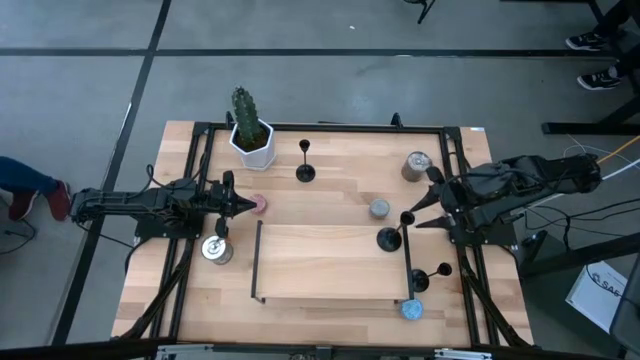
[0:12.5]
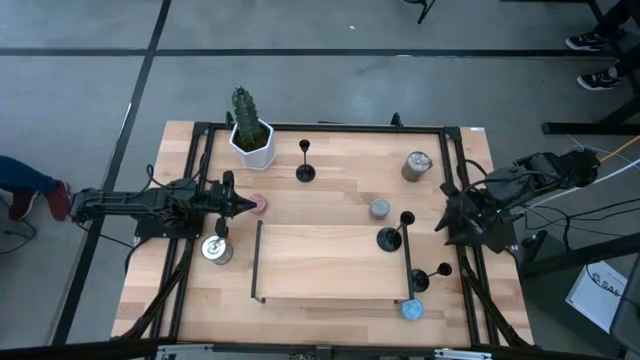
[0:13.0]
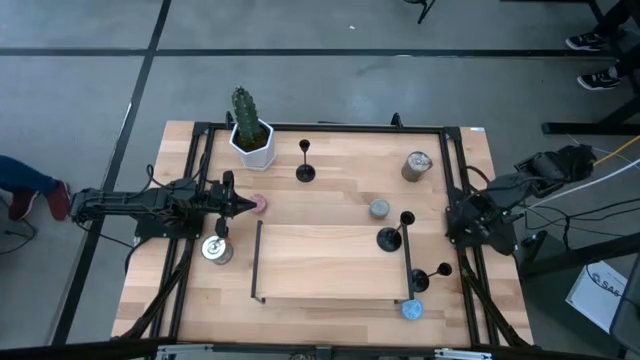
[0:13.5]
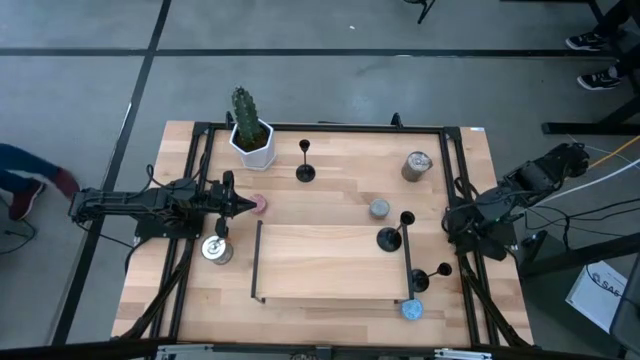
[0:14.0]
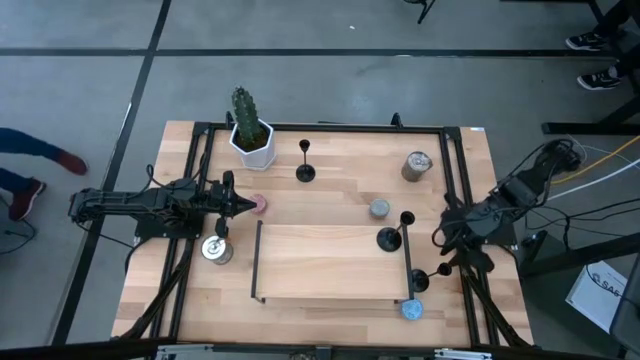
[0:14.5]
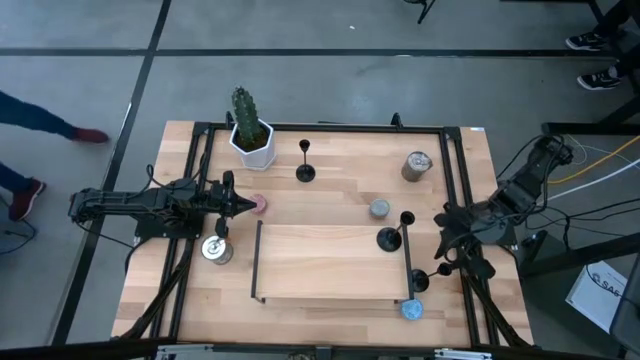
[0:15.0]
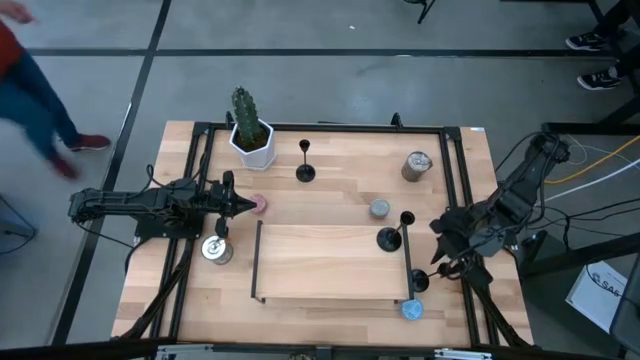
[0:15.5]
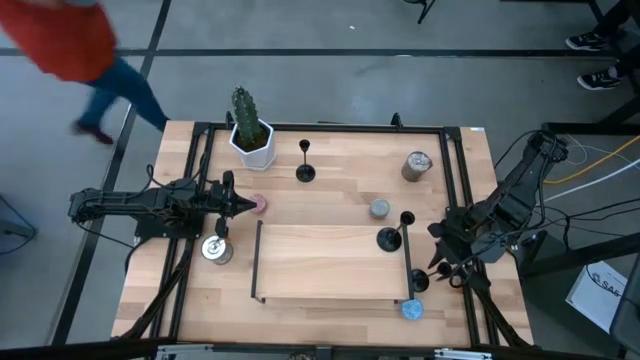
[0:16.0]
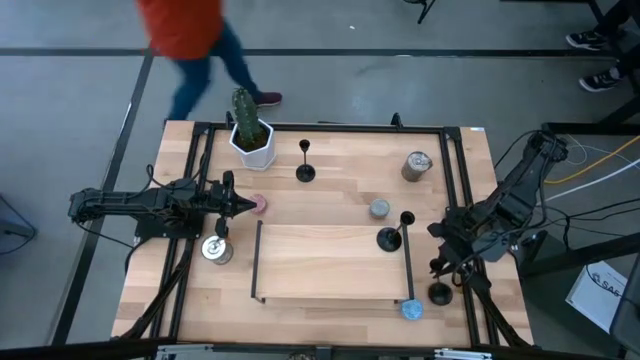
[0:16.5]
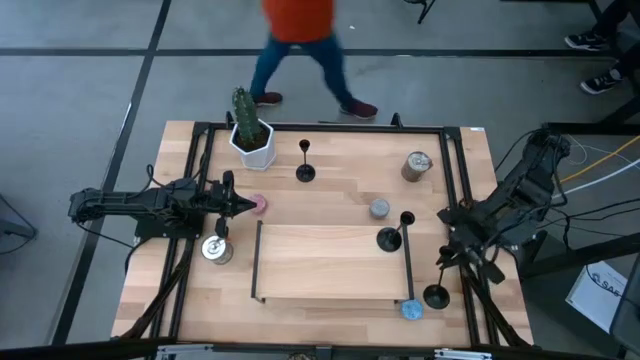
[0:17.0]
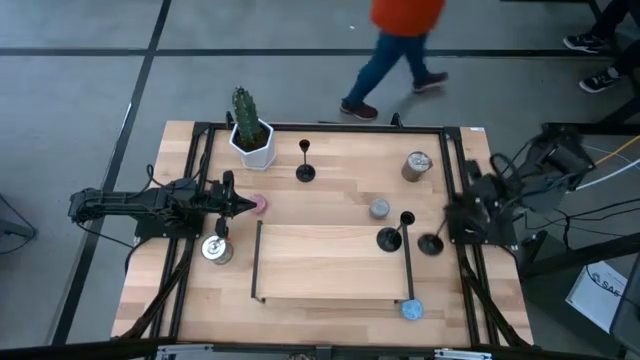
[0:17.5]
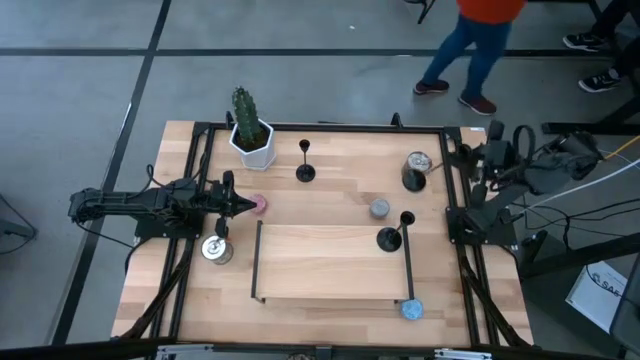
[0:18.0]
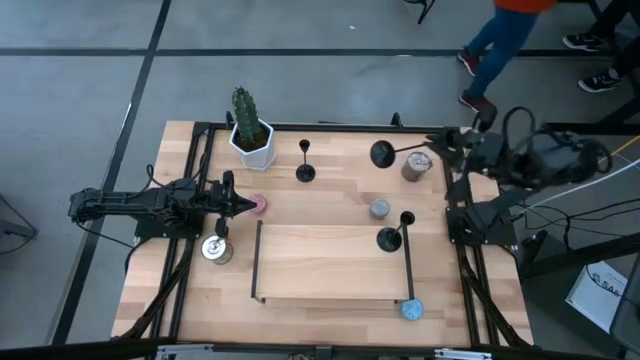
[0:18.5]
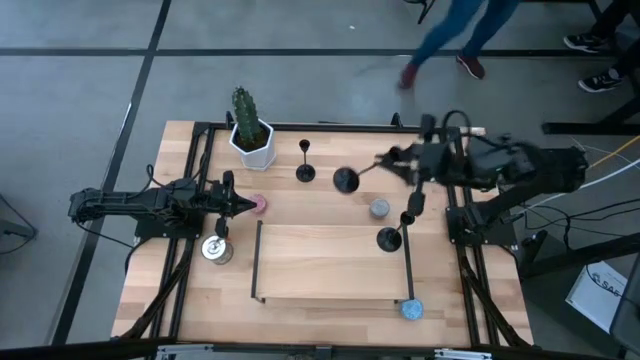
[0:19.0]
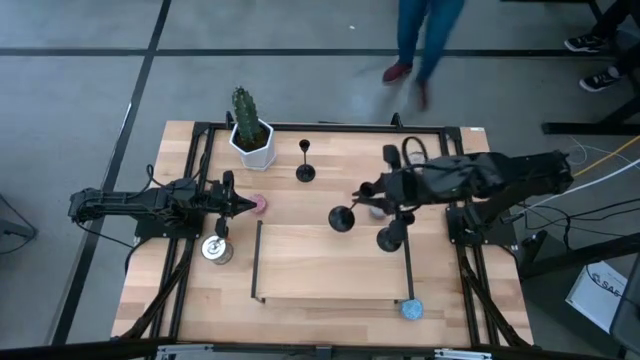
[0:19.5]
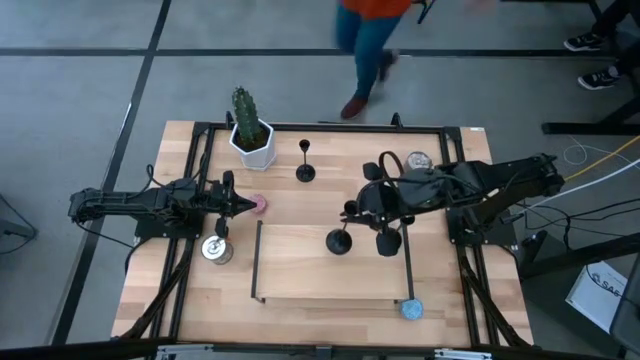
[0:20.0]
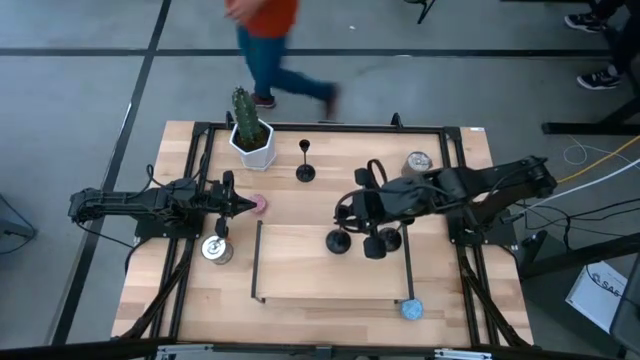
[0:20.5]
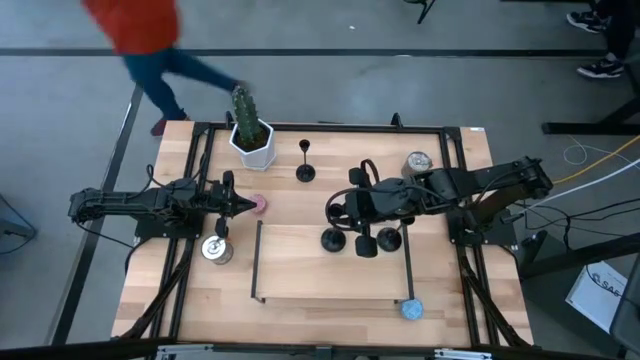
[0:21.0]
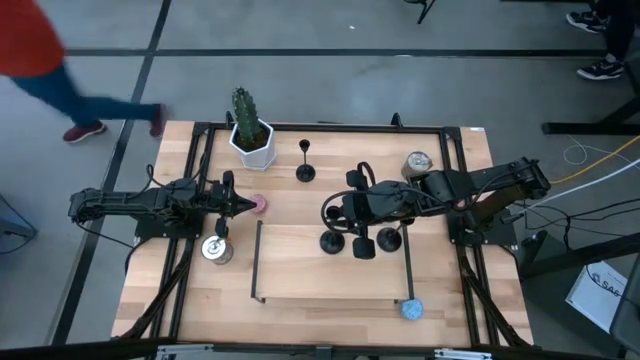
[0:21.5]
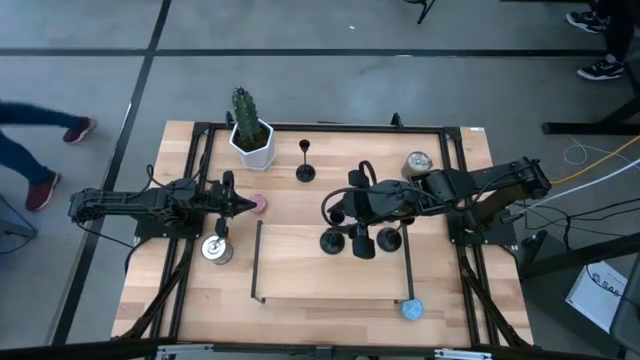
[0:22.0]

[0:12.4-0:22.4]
Task: Pick & Place candle stick holders
Put the bottom black candle holder on the shelf

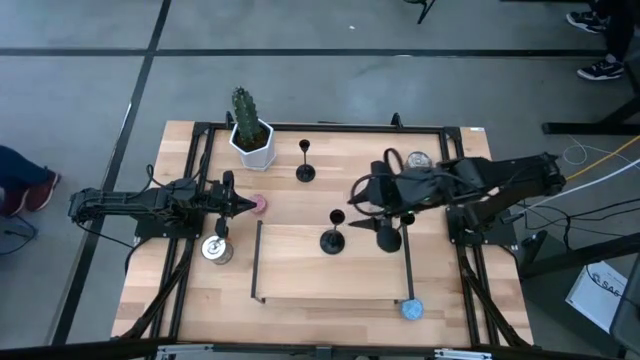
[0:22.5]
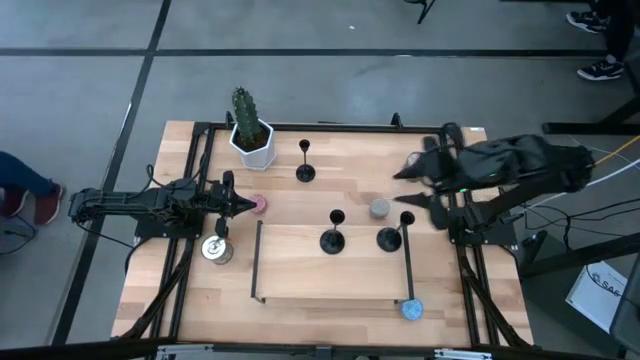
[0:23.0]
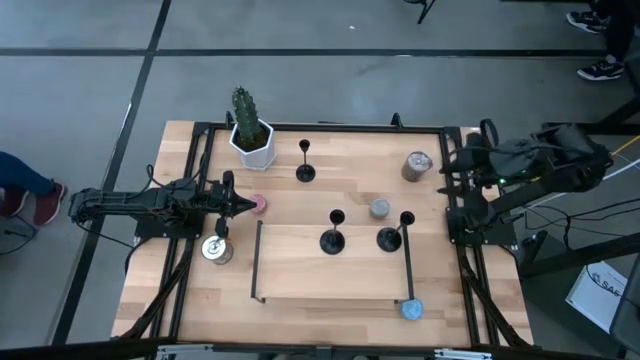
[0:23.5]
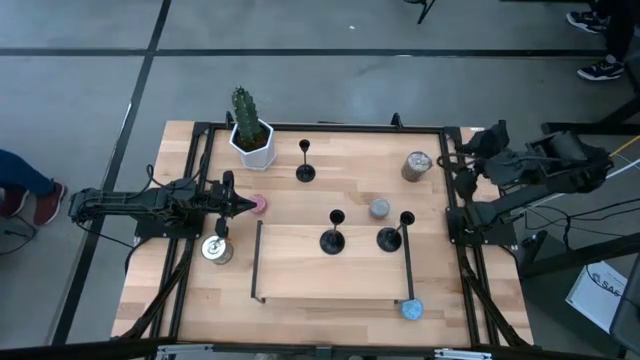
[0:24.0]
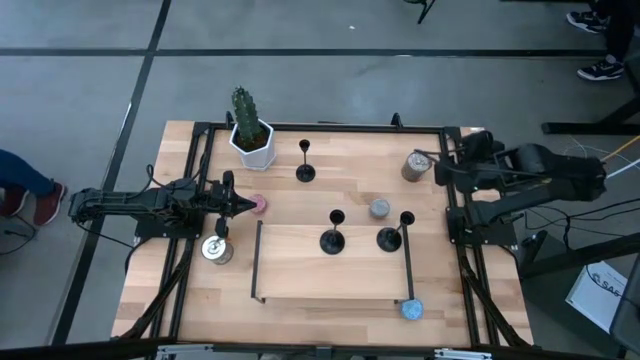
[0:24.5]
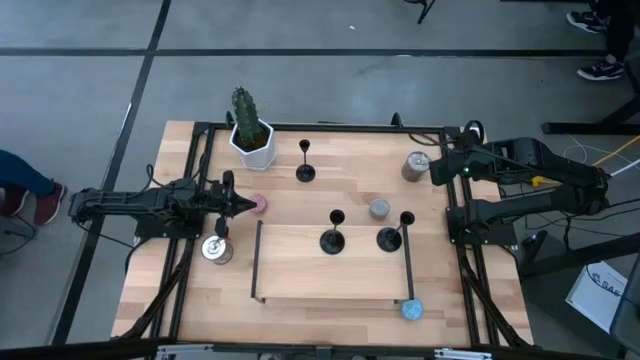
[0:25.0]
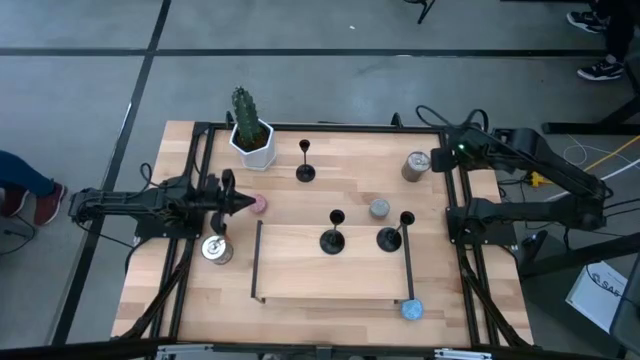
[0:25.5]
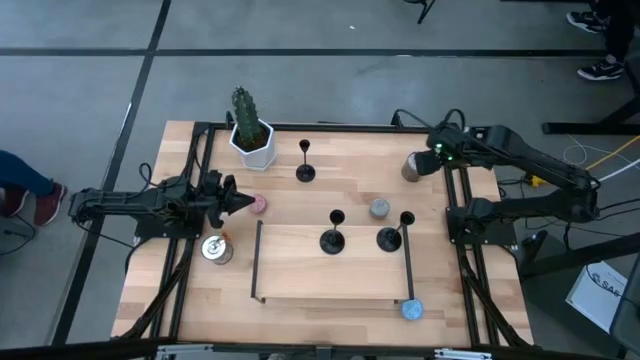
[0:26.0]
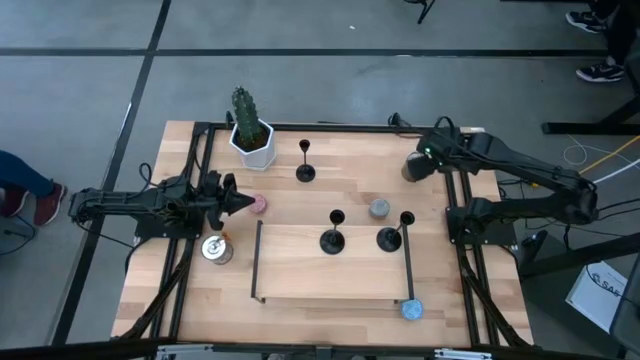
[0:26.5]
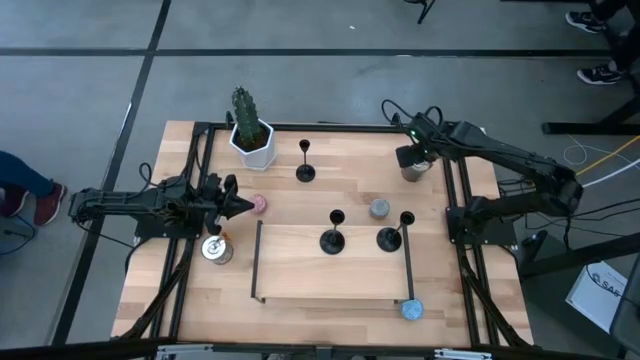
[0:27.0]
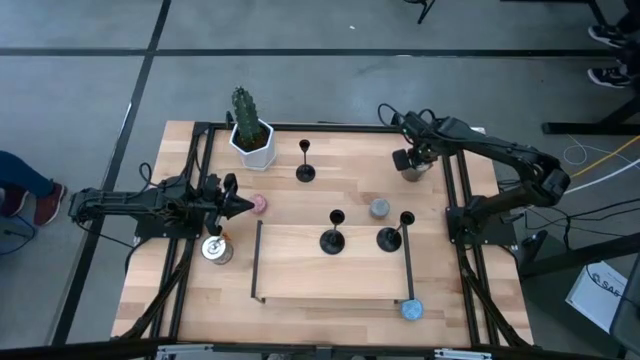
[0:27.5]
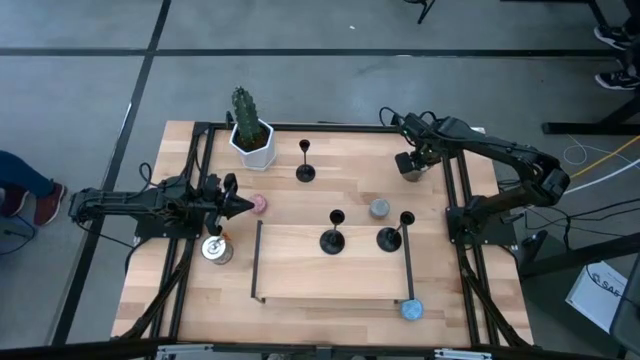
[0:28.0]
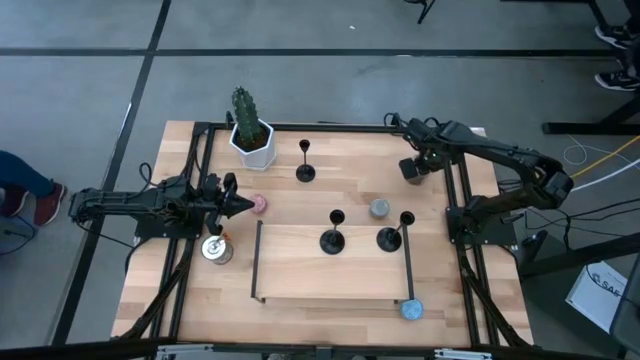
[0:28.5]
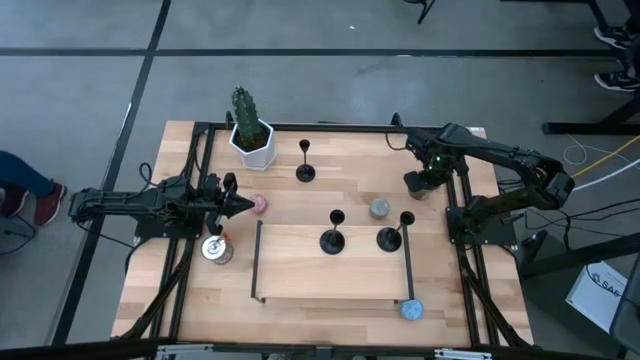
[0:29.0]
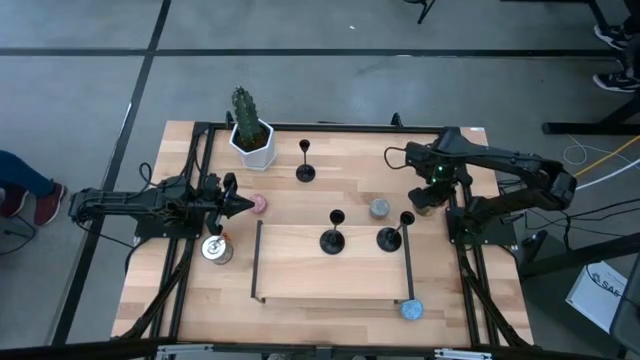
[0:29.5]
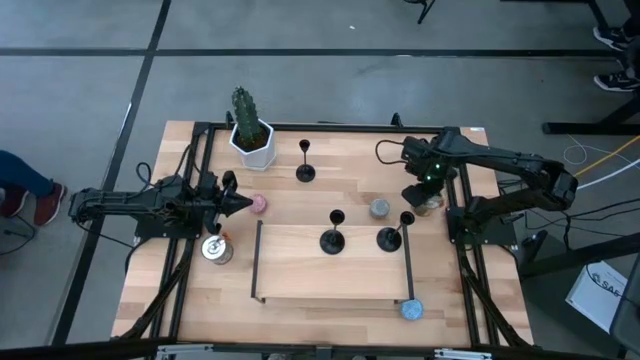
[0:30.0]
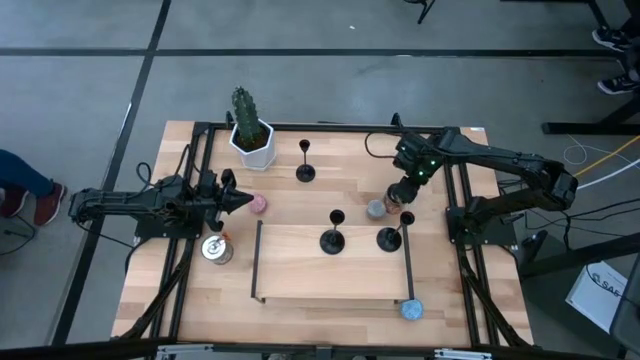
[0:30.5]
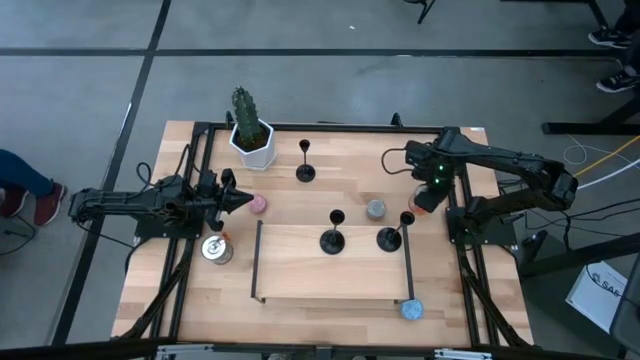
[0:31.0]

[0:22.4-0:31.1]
Adjust the top silver scented candle

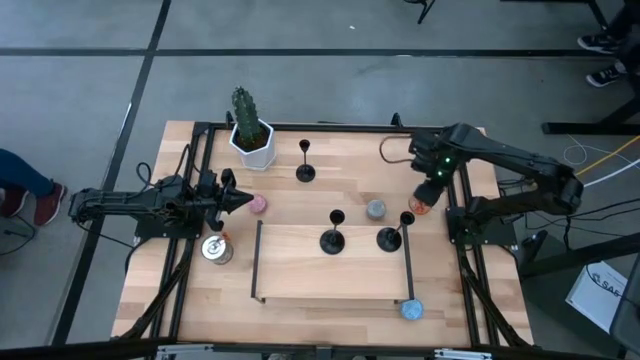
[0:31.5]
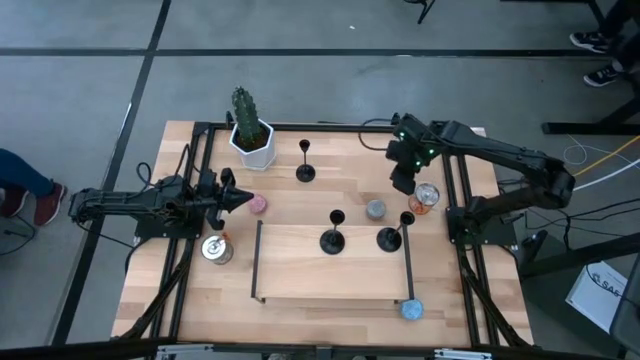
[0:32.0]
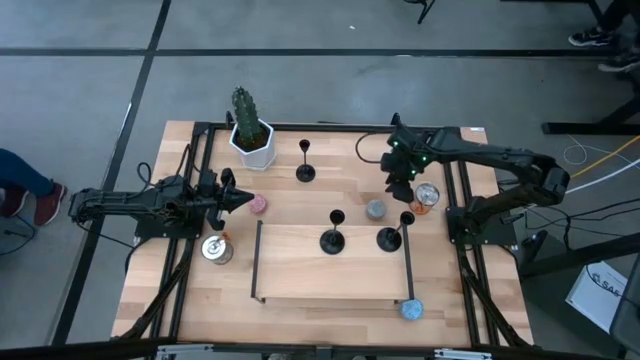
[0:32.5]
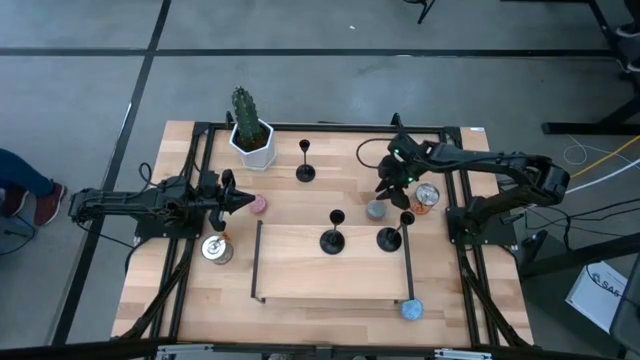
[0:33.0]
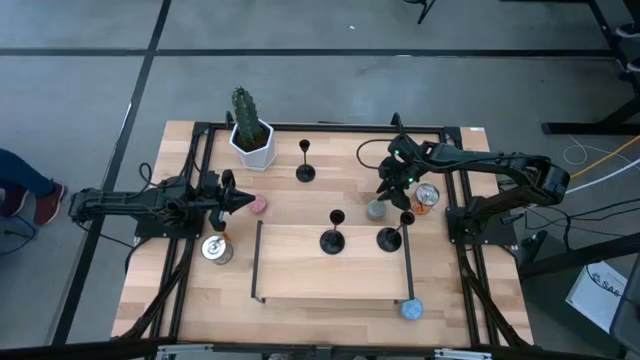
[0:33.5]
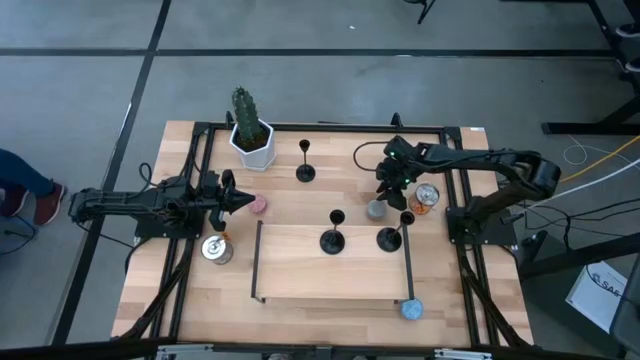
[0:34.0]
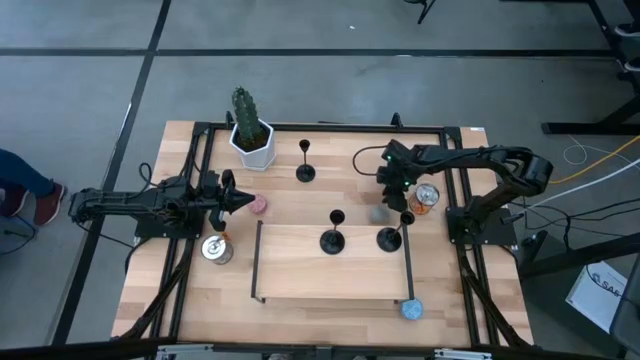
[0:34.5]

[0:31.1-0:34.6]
Put the blue scented candle on the shelf
